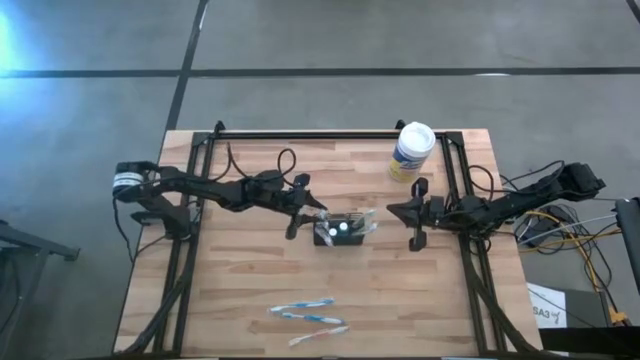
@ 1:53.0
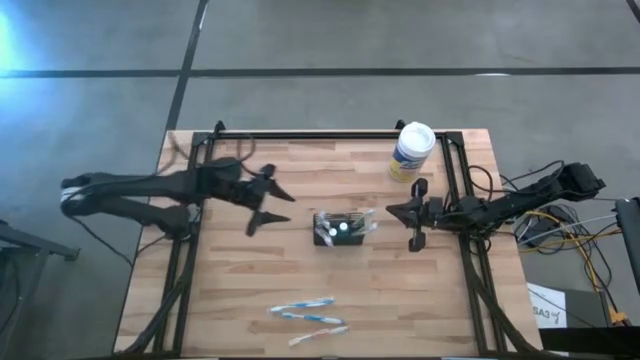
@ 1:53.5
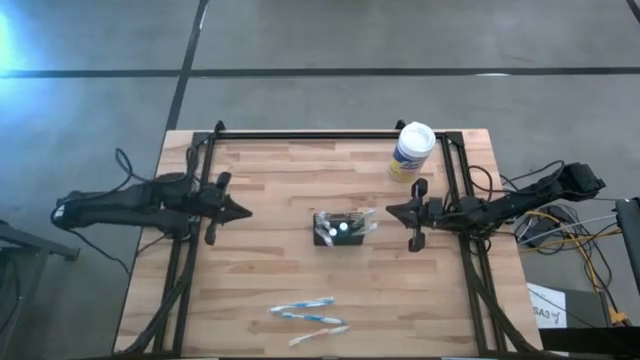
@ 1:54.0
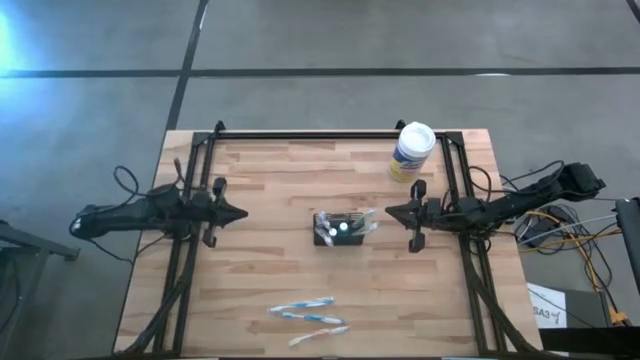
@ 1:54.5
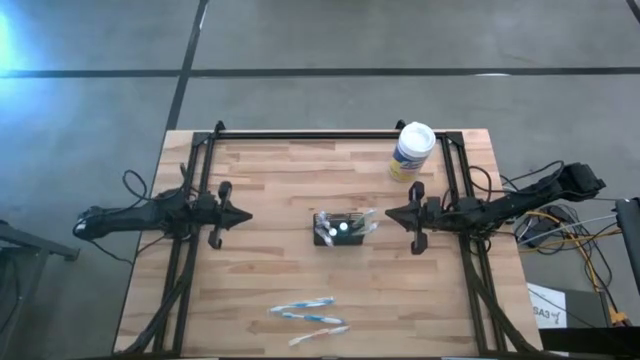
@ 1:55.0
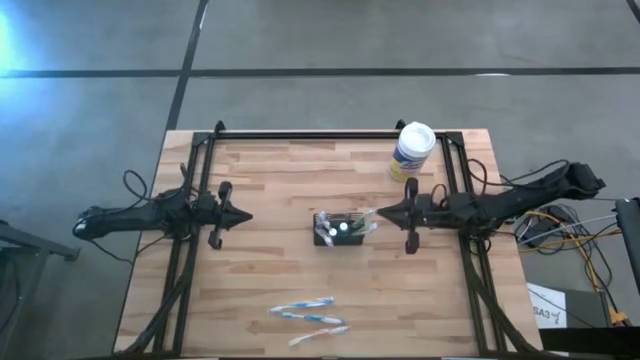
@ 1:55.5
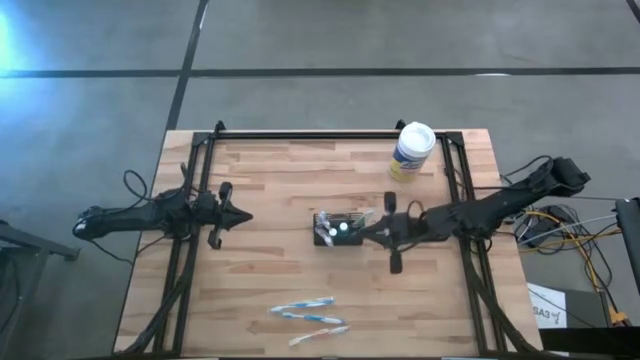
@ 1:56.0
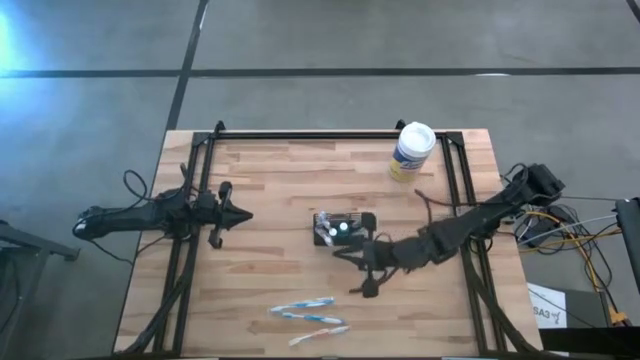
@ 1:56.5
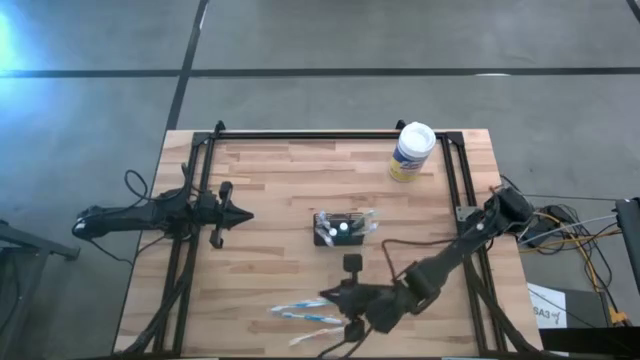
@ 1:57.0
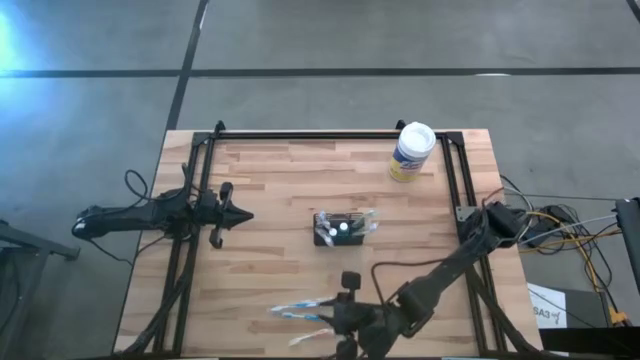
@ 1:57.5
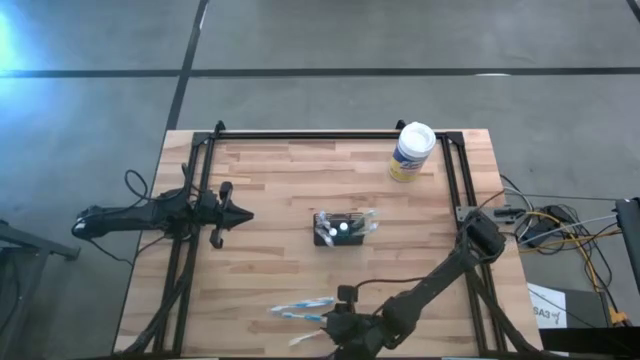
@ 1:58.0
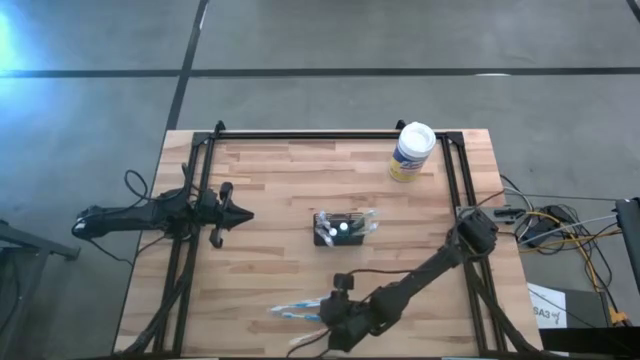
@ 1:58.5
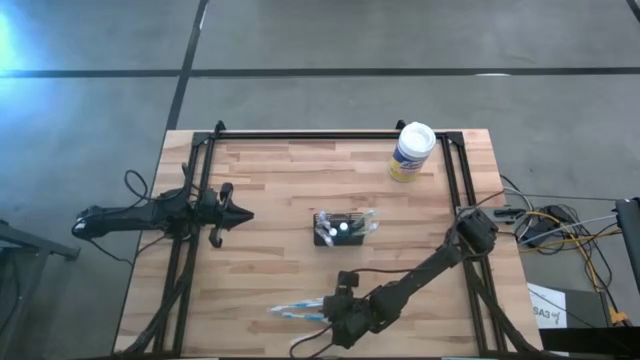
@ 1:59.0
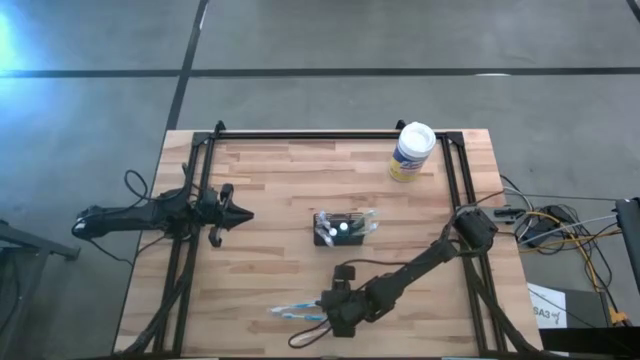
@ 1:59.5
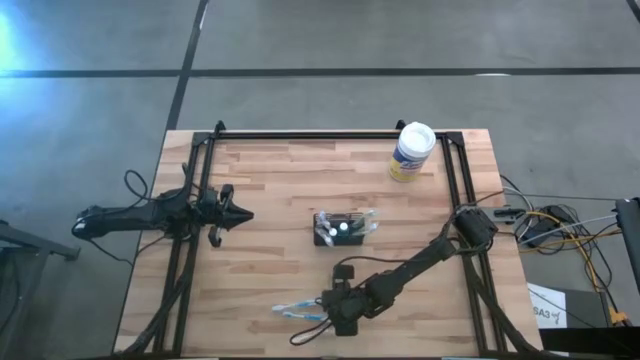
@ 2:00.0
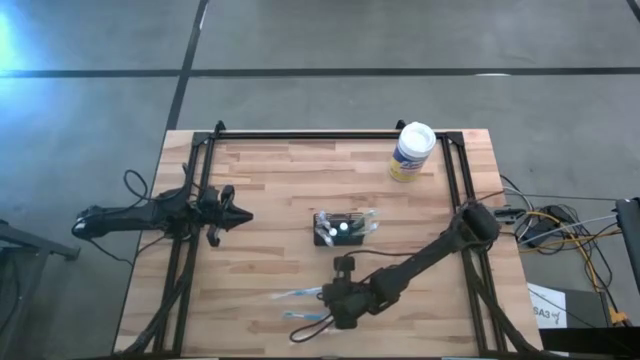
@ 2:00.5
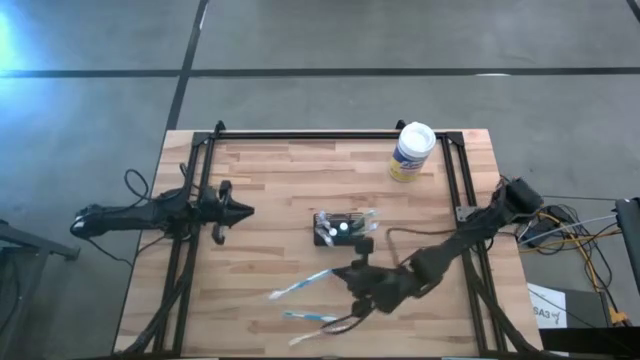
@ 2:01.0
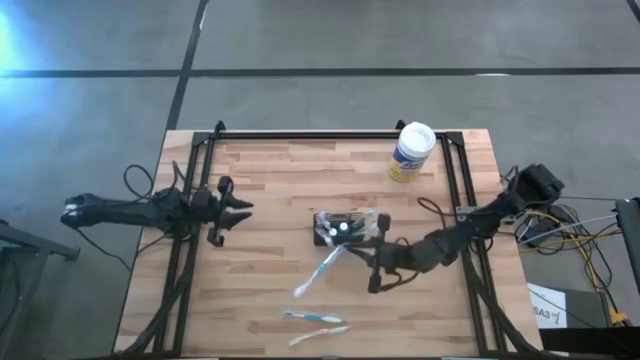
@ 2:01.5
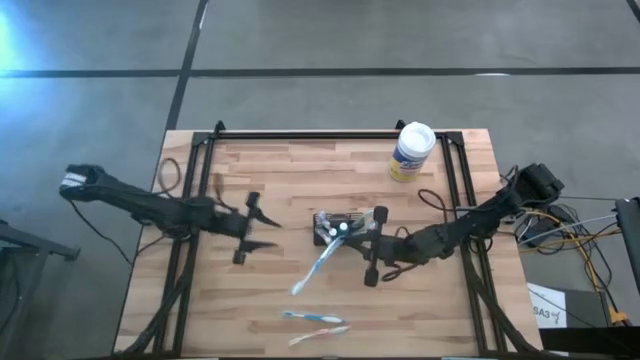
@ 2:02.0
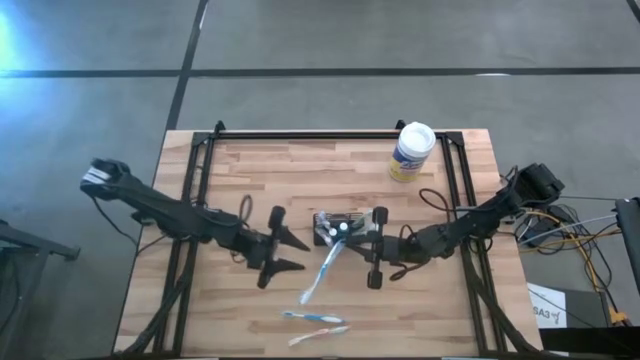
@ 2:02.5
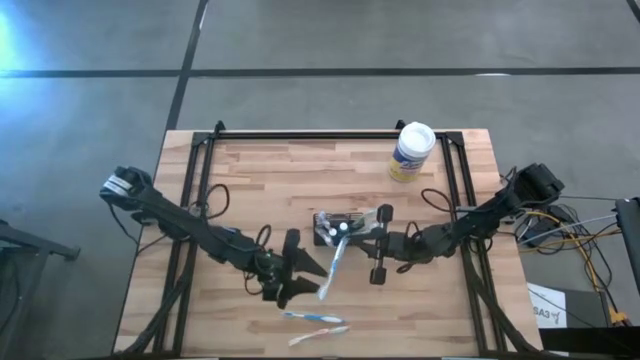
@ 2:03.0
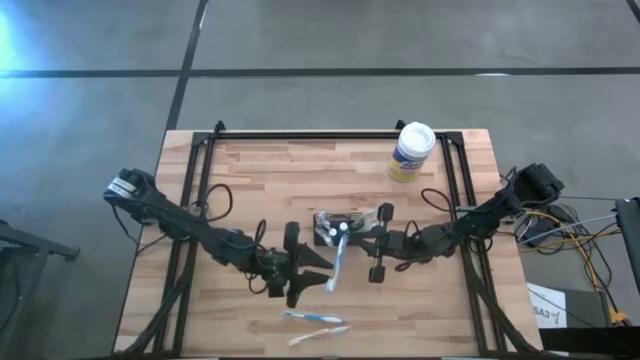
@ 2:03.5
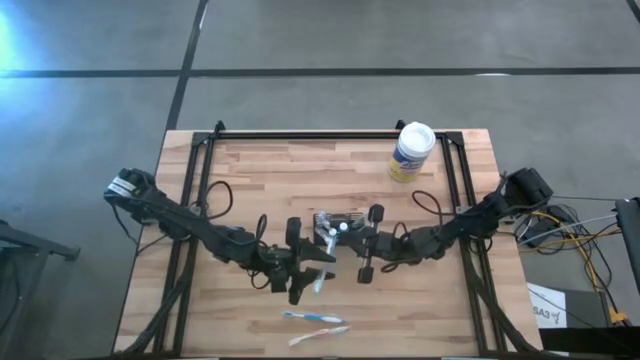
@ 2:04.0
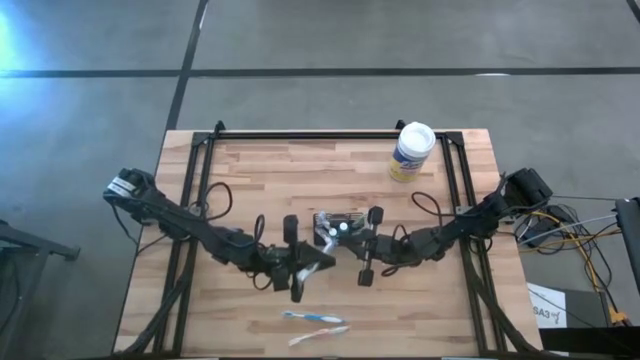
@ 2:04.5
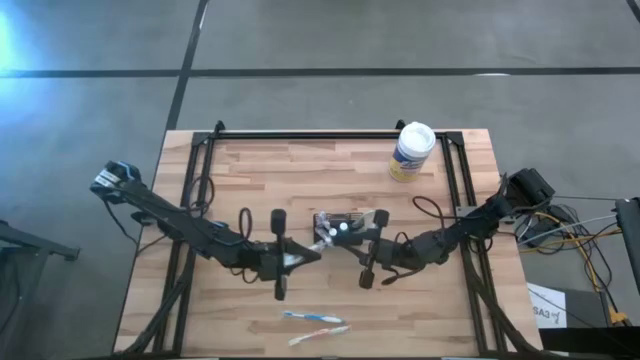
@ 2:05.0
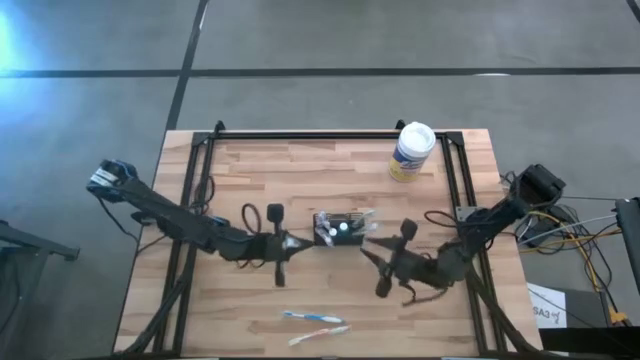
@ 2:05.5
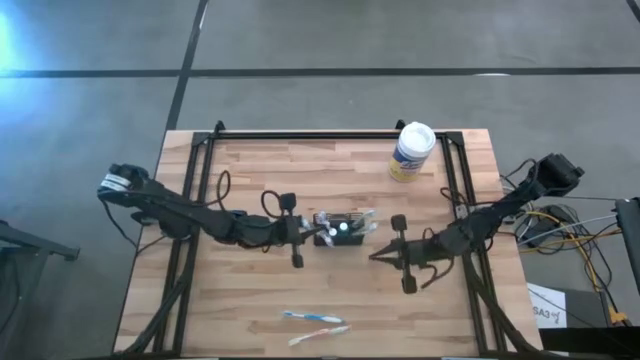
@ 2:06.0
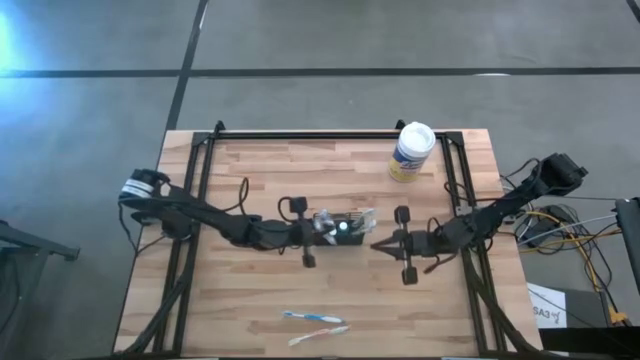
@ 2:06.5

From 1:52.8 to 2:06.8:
Task: Pick & Place toothbrushing station
Put the top blue toothbrush into the mesh organizer

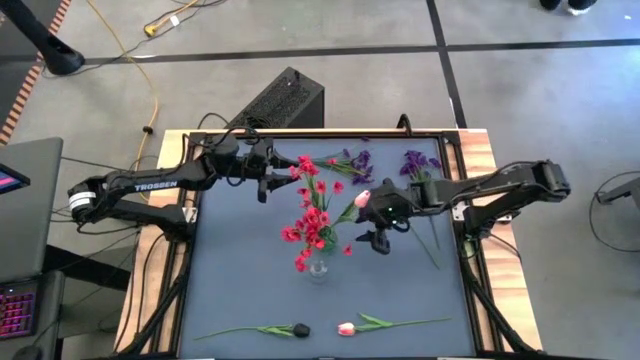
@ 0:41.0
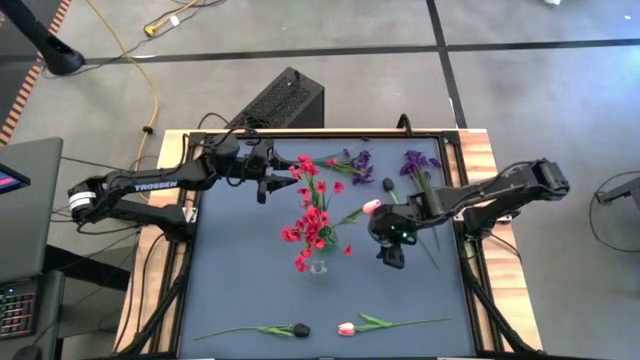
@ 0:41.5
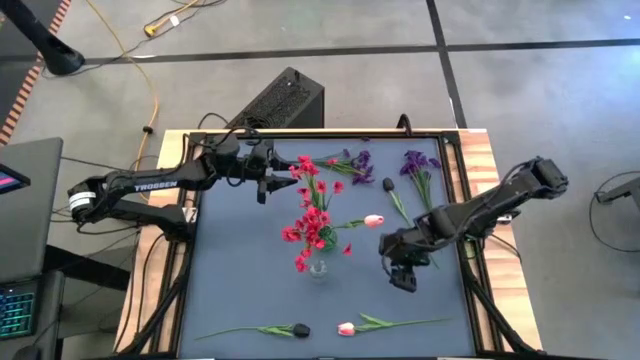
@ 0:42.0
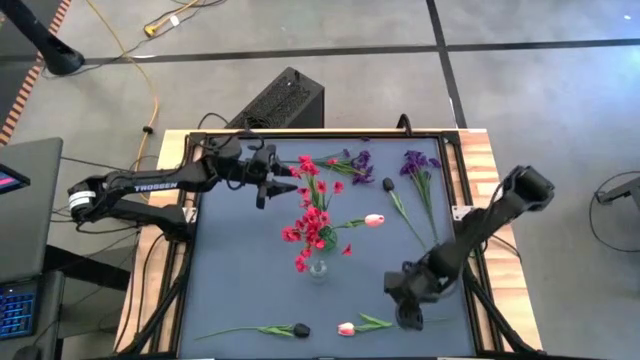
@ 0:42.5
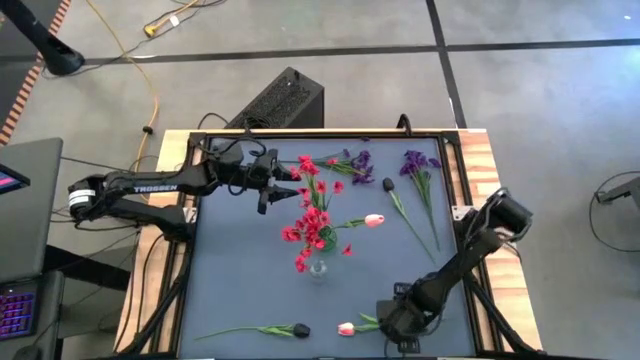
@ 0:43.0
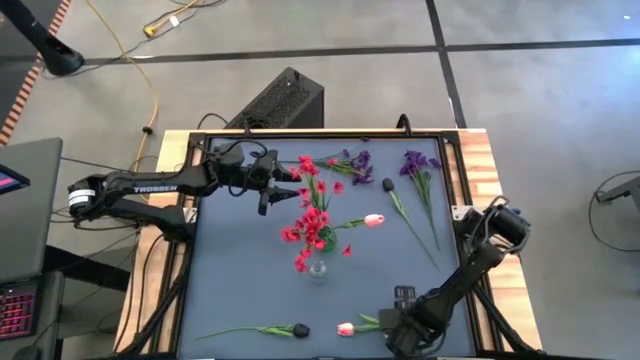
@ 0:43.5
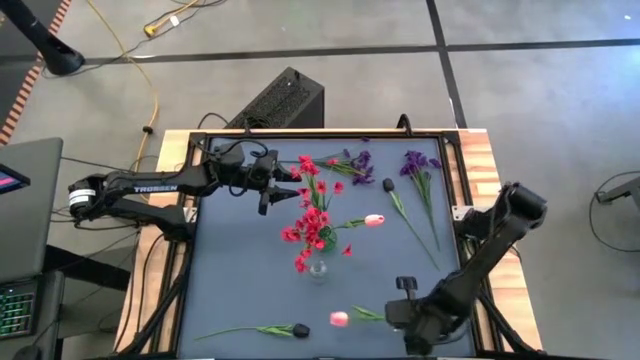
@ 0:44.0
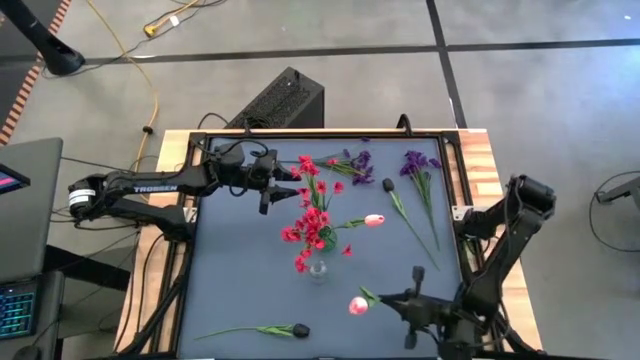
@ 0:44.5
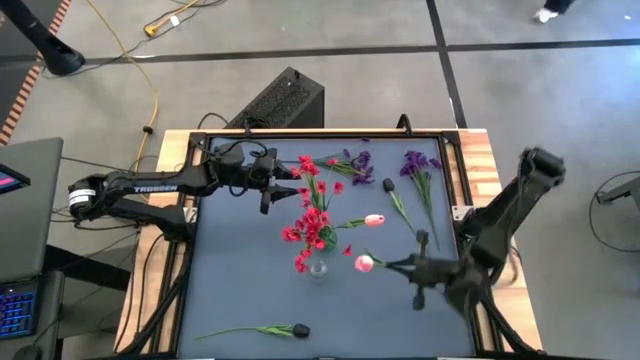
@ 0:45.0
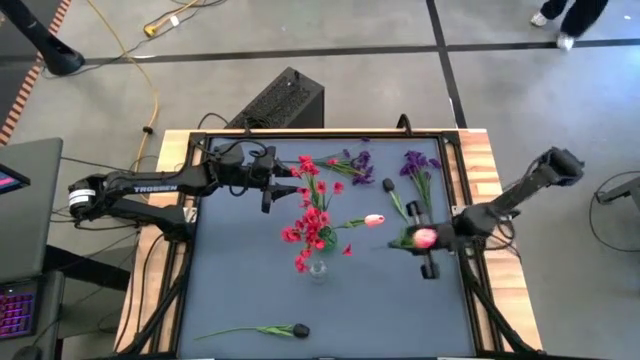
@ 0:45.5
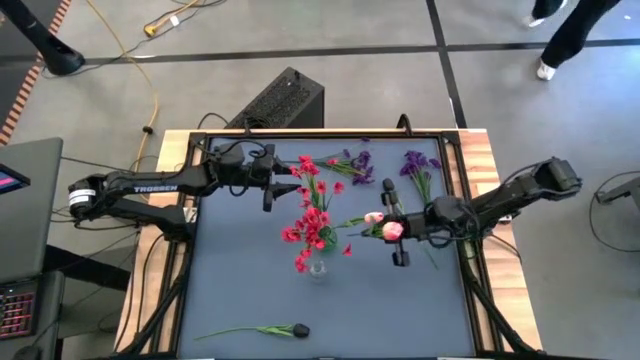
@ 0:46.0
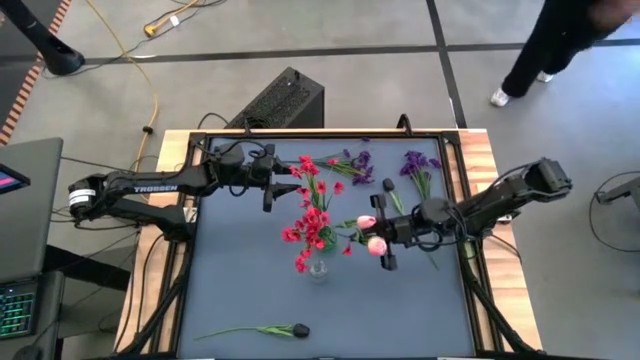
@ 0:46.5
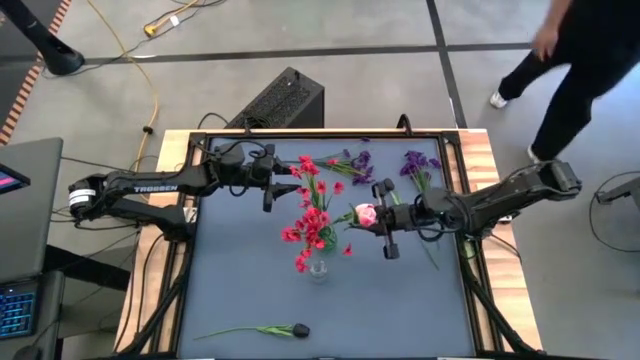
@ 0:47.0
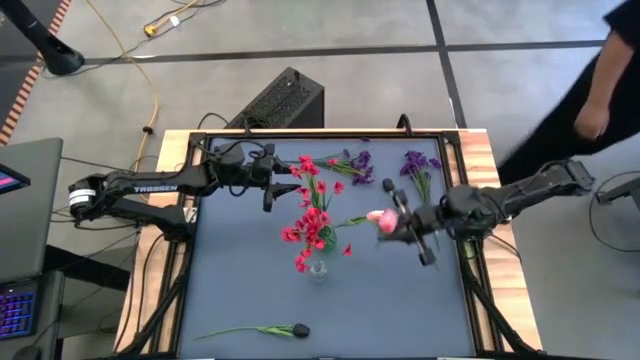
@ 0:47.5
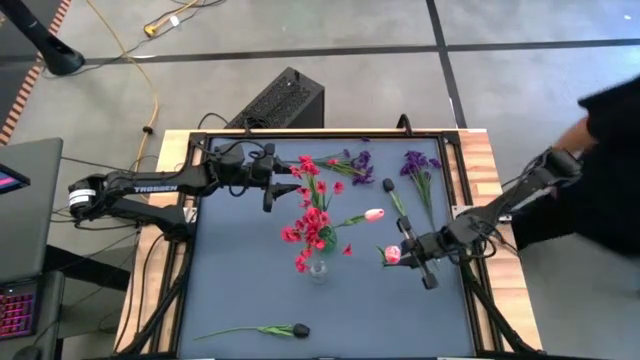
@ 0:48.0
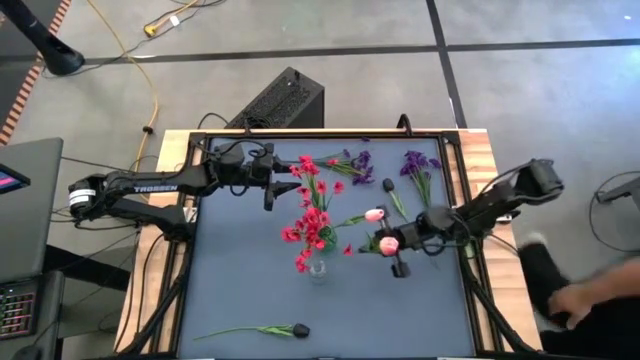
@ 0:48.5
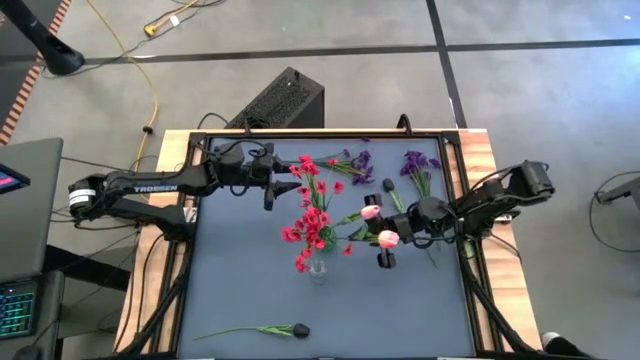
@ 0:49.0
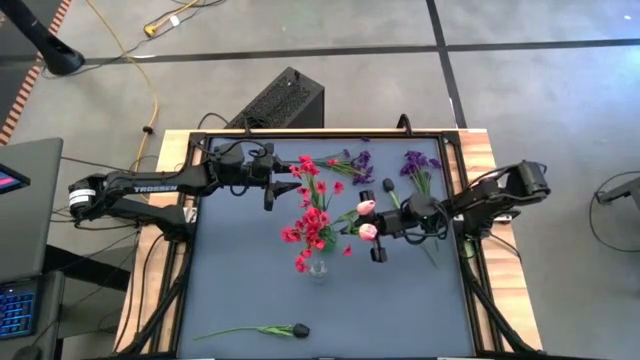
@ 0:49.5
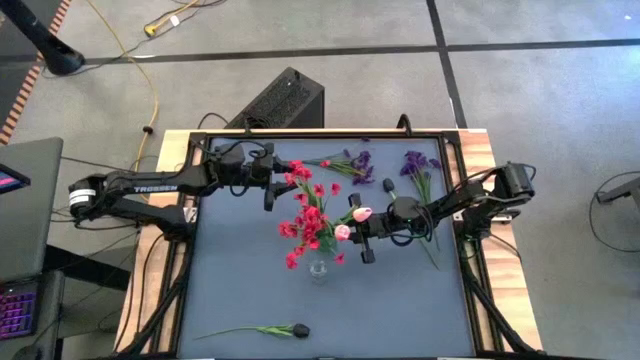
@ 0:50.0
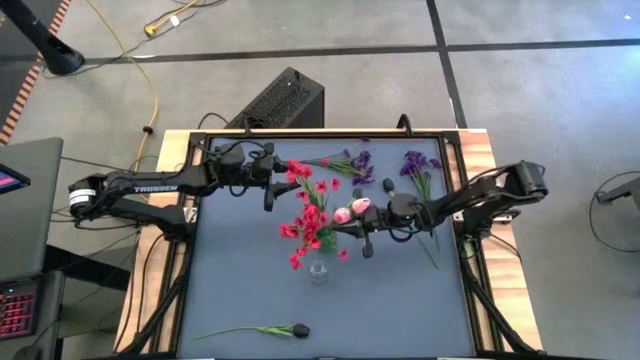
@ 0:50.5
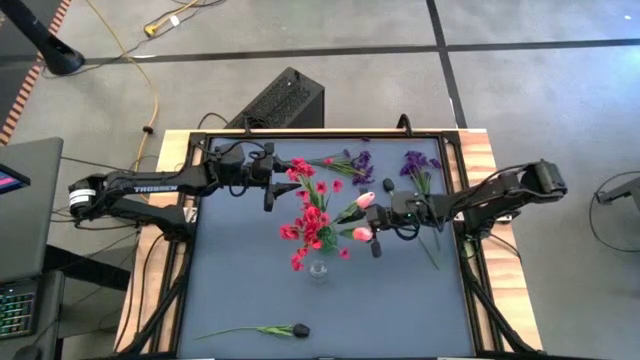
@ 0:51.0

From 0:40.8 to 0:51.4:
Task: Sort flowers into vase by color
Put the pink flower into the green vase
